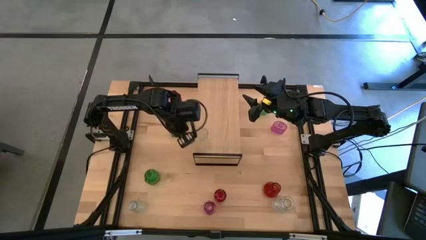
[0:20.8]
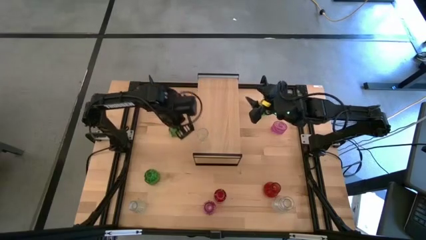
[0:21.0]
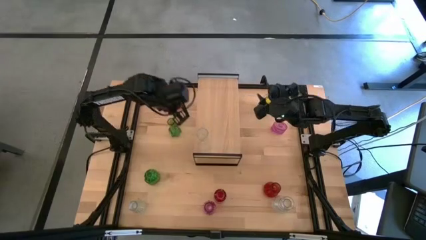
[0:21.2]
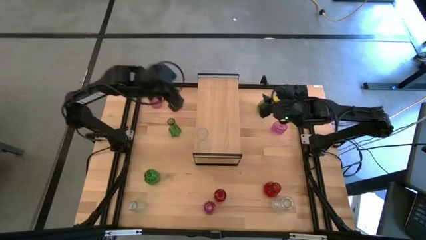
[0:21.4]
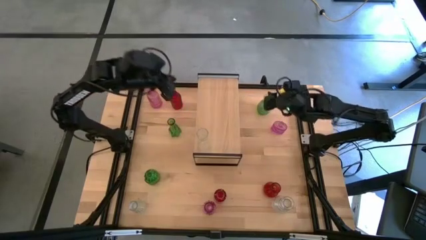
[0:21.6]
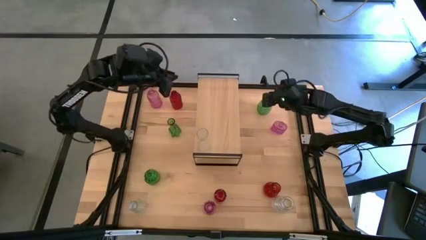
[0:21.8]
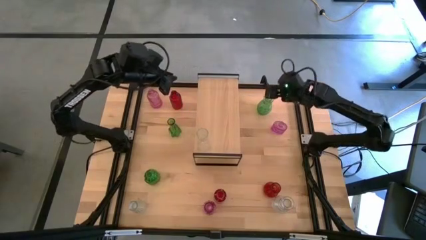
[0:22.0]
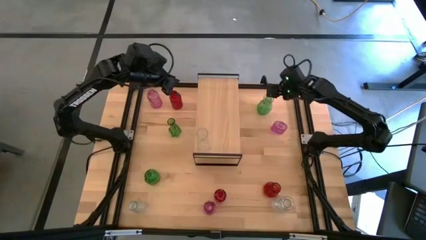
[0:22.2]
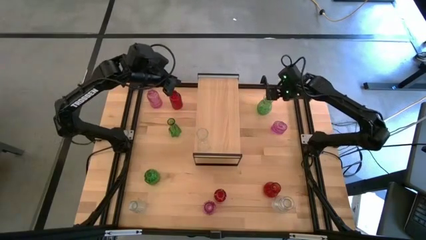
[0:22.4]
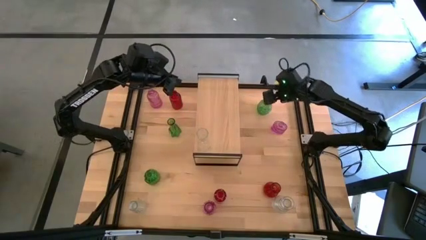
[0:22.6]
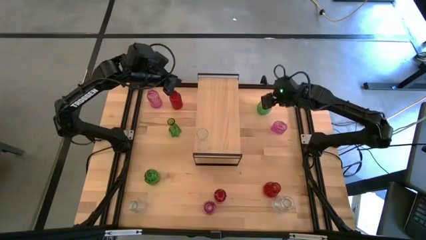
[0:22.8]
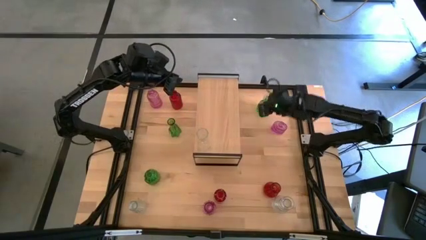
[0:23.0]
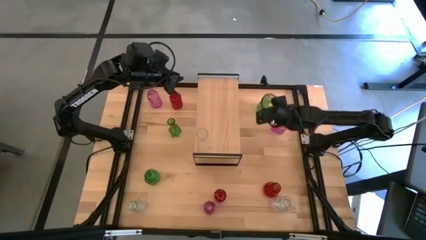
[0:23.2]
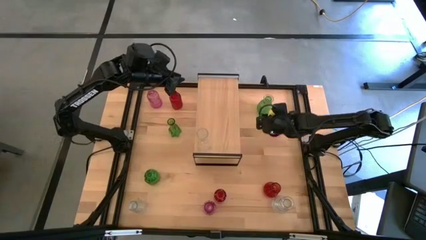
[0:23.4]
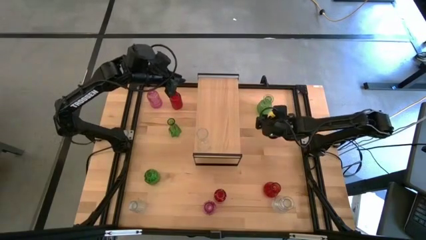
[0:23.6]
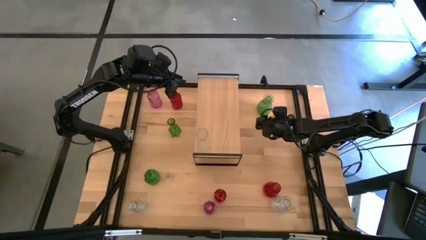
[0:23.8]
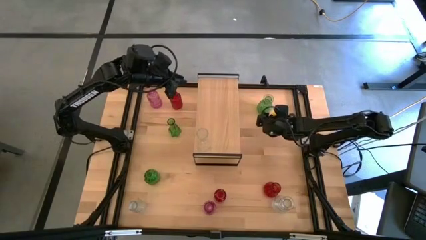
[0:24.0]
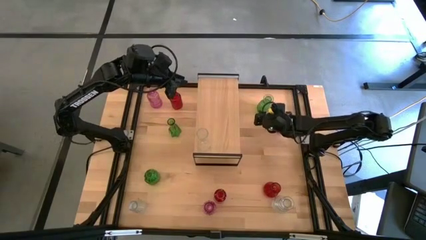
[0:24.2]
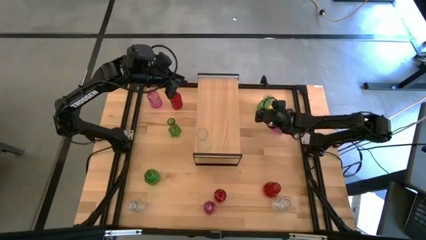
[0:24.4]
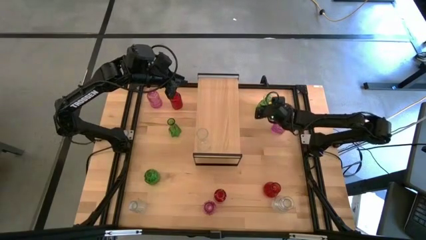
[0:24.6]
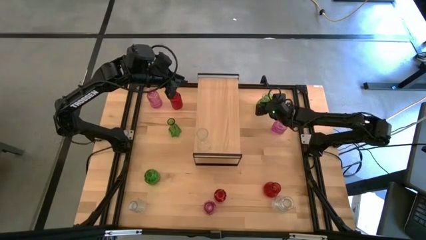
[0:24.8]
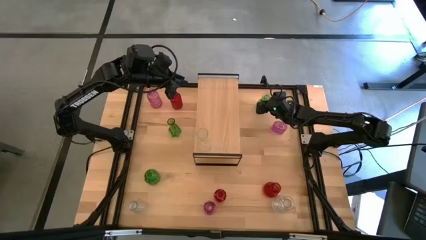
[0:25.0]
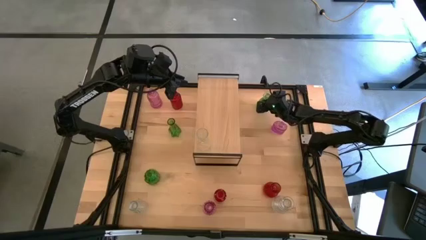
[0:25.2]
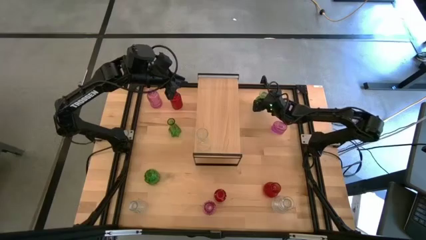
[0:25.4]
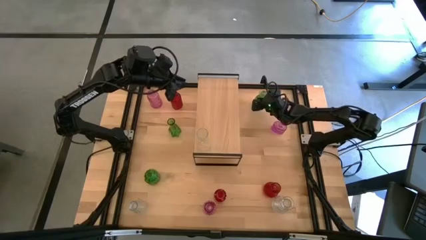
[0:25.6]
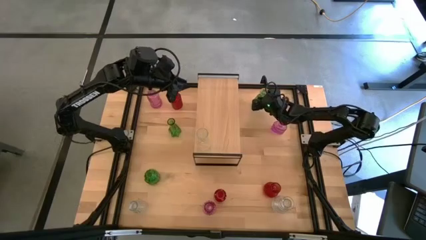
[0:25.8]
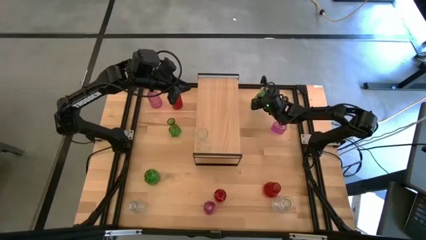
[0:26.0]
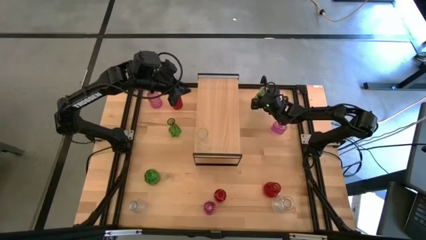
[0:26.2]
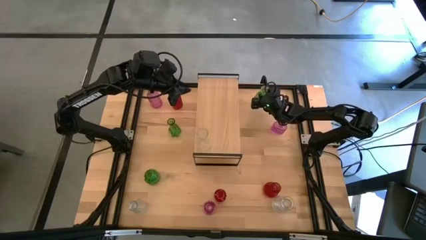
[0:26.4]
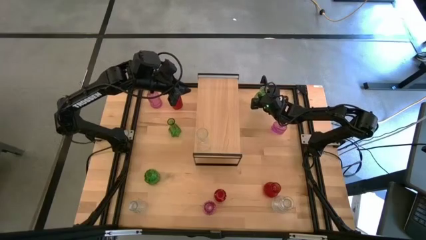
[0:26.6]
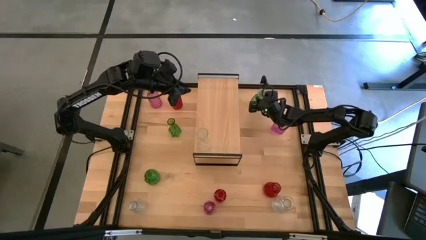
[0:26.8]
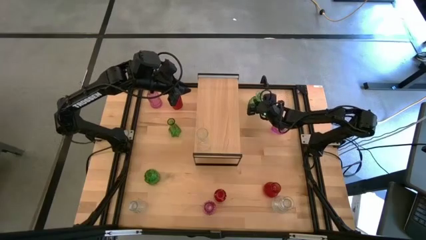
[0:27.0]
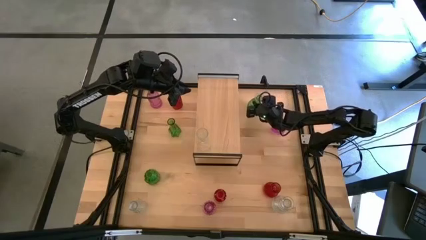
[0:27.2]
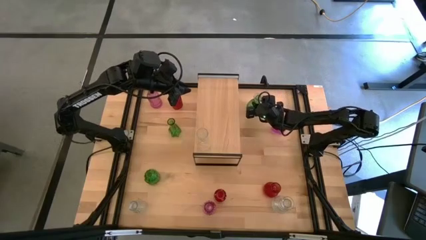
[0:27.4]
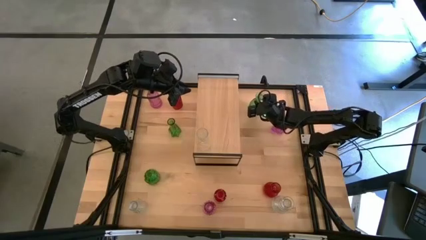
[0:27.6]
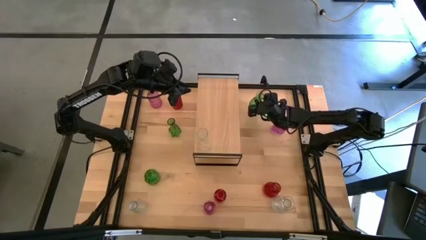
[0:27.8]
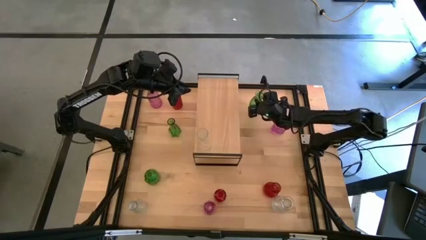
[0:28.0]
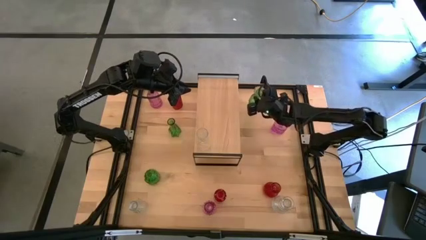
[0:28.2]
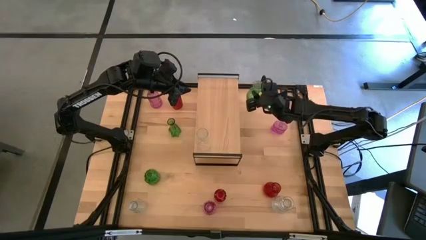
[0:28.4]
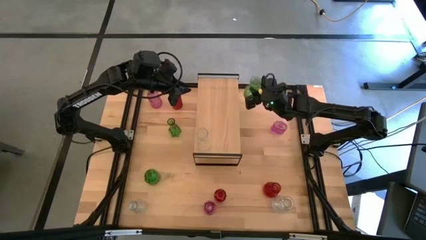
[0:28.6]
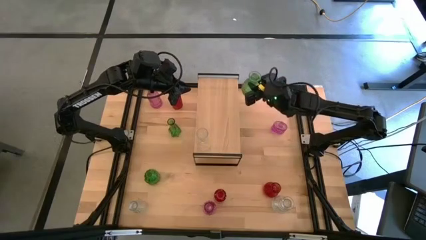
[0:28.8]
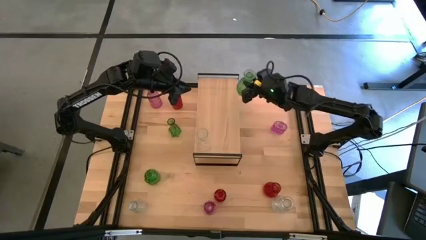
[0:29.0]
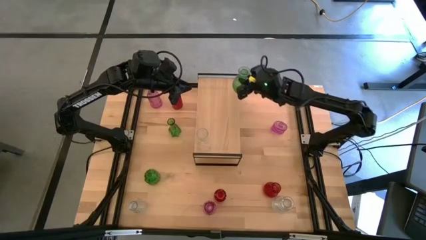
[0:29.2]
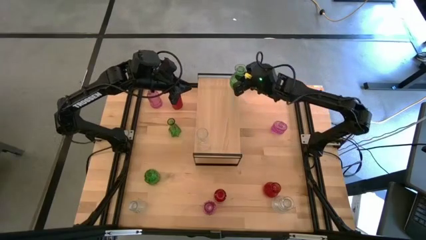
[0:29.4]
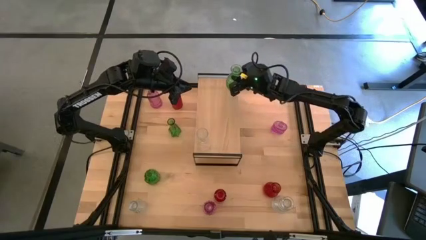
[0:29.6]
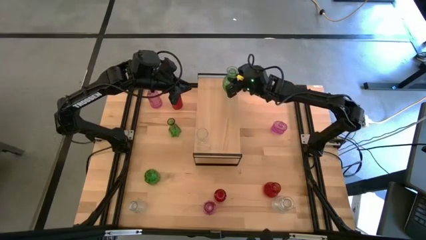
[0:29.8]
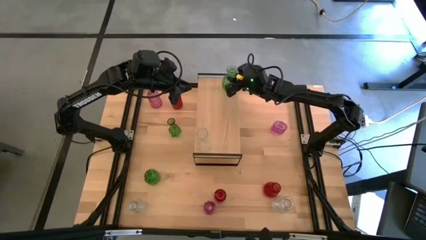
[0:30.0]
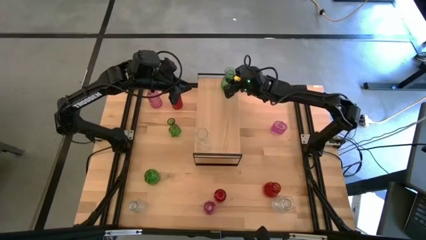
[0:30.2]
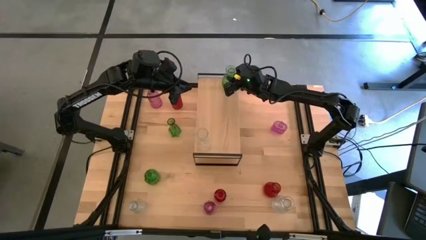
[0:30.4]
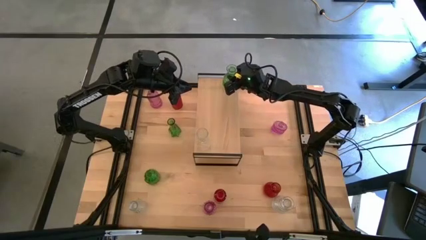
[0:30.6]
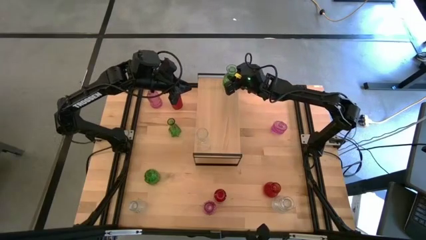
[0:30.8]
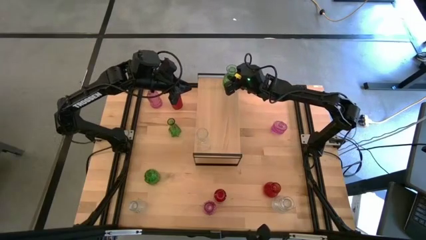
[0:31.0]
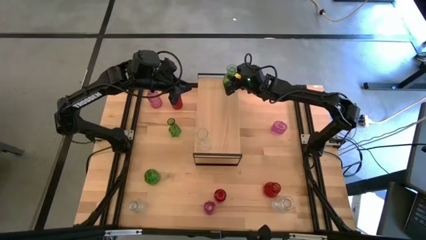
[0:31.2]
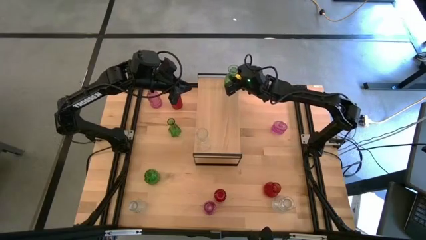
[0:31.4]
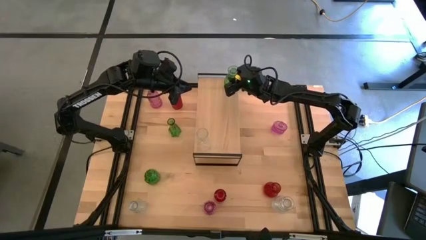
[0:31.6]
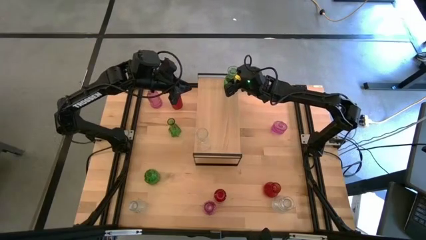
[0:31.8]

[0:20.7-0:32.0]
Task: sort vases onto shelf
Put the top green vase on the shelf

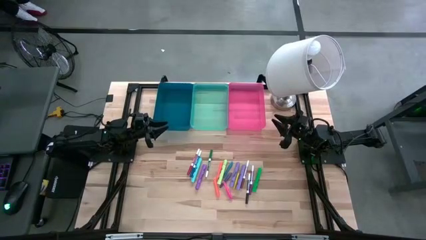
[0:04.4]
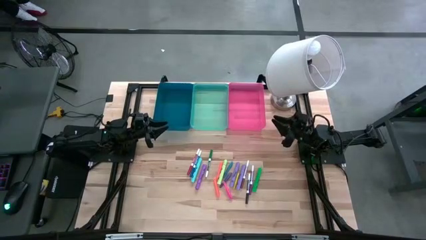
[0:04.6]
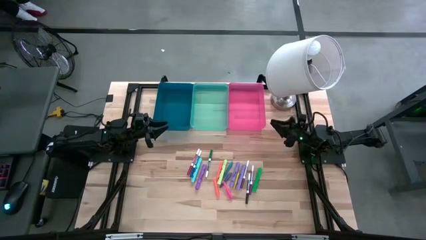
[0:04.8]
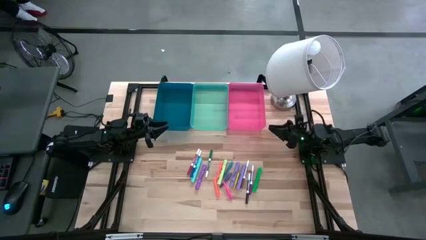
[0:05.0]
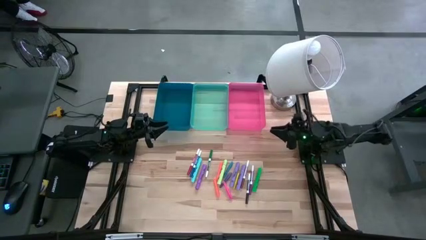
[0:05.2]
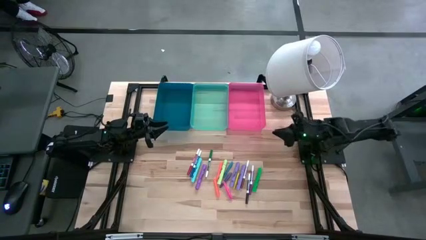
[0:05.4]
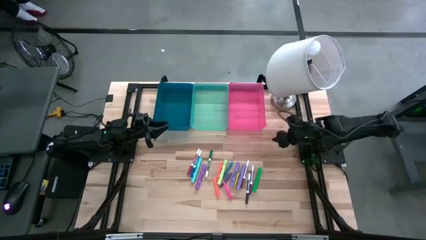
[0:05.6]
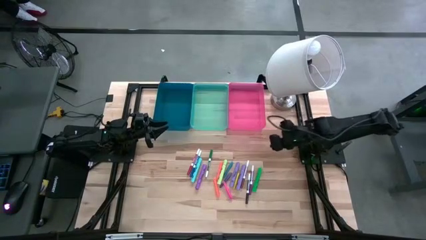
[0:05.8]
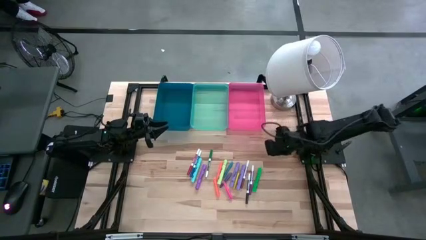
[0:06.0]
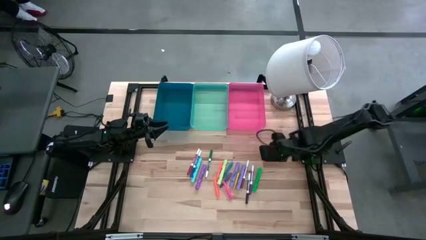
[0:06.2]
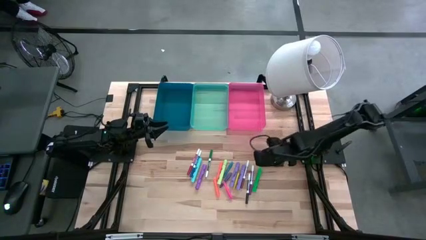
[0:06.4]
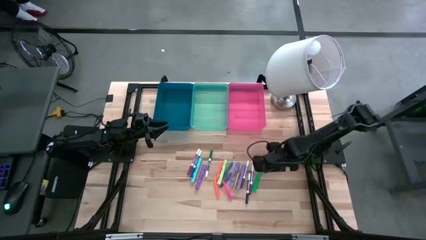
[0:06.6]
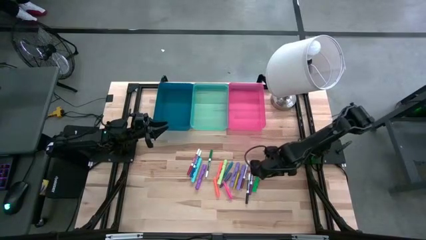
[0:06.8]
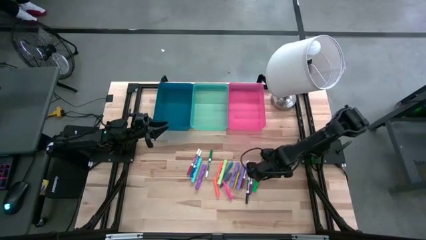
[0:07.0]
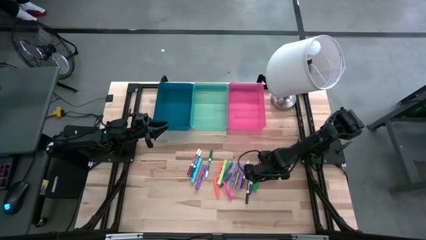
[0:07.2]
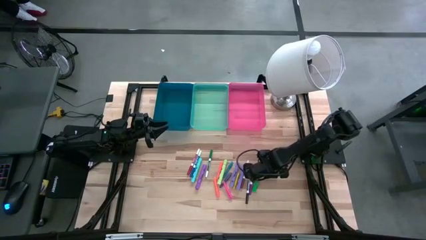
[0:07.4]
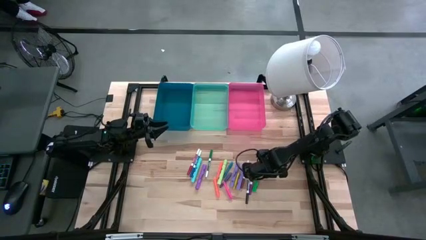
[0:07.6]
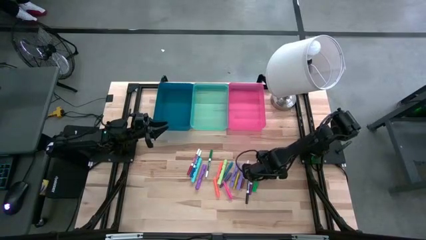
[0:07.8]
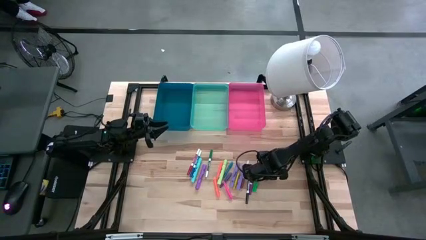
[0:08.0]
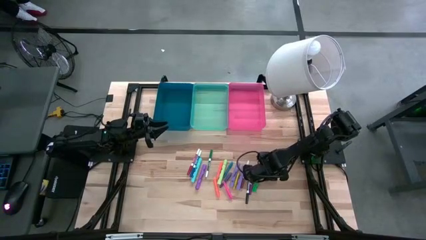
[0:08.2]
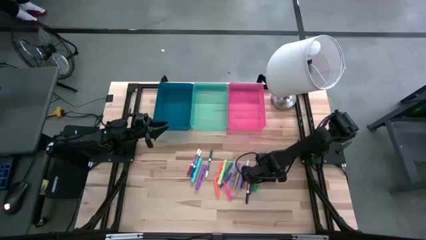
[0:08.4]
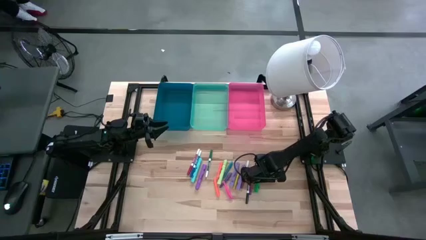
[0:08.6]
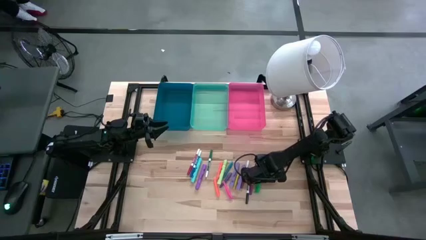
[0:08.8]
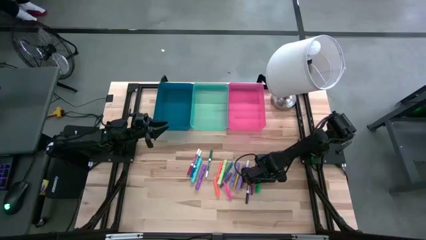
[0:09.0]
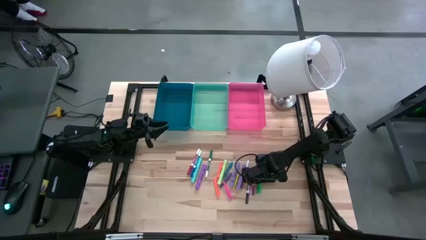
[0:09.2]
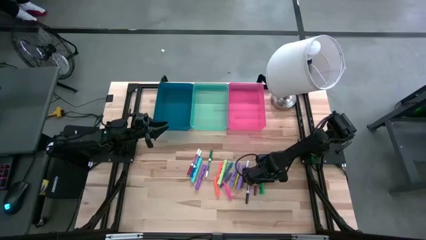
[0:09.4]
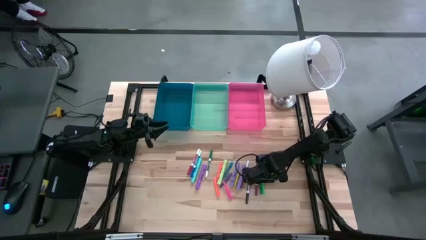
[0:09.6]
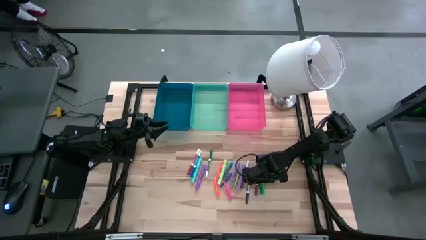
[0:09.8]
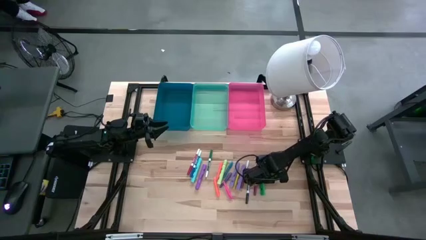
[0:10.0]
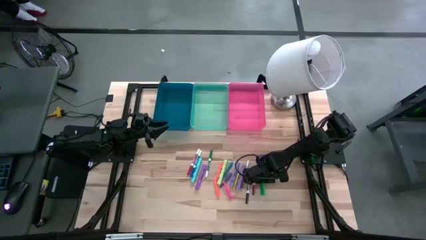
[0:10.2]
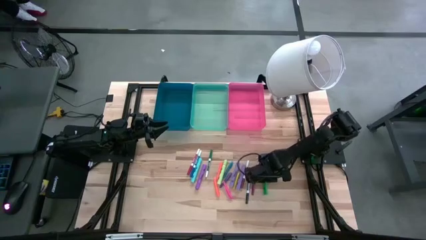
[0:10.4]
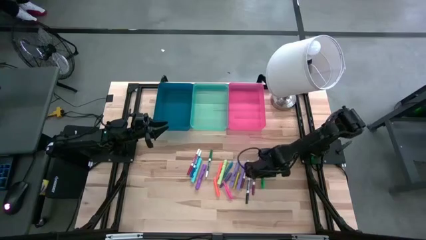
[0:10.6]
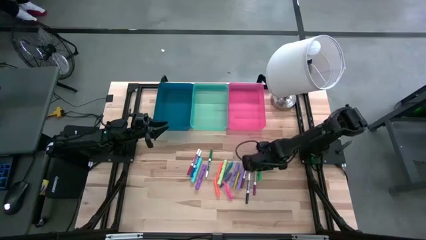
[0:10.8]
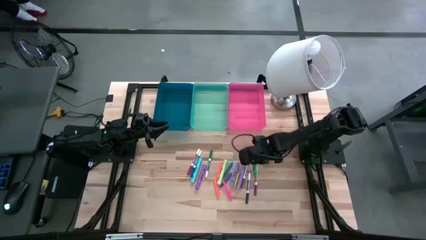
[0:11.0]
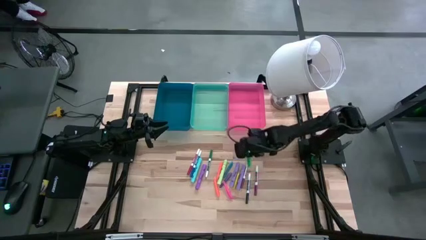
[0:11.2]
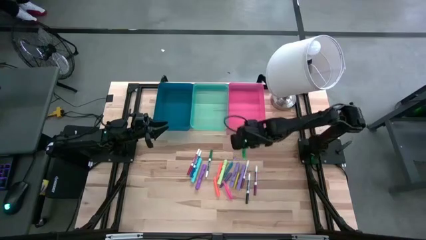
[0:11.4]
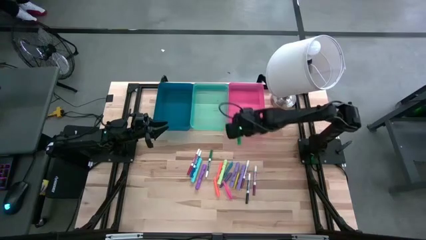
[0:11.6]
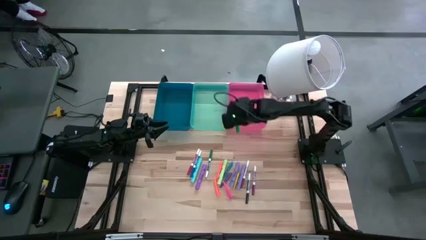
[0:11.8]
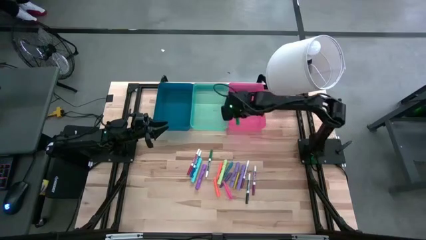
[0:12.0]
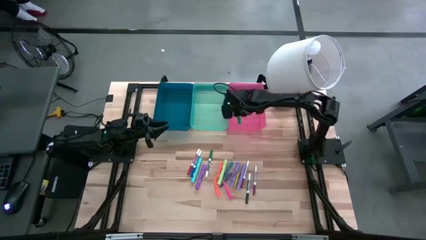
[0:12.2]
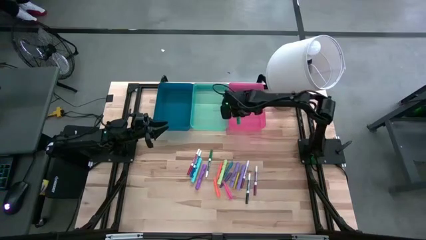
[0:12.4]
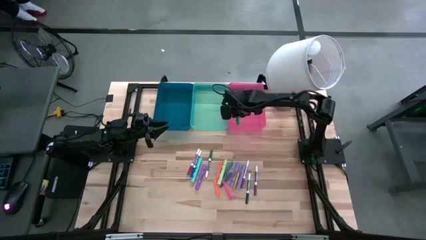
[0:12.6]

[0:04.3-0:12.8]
Task: Pick & Place Markers
Put the green highlighter pen into the pink bin
